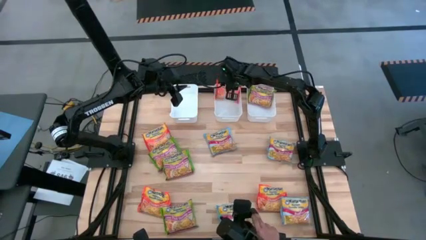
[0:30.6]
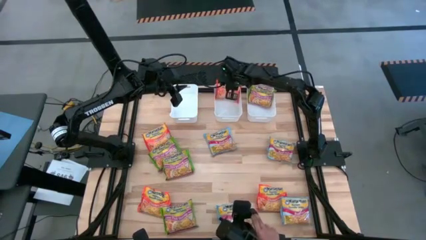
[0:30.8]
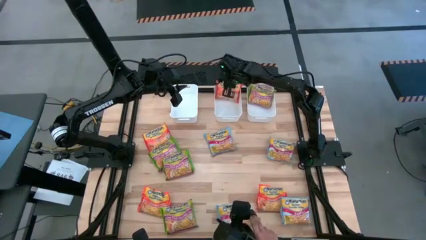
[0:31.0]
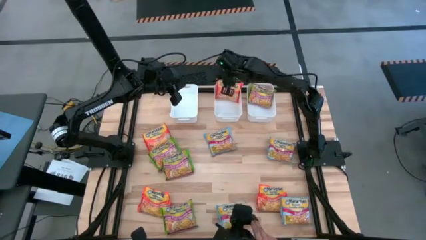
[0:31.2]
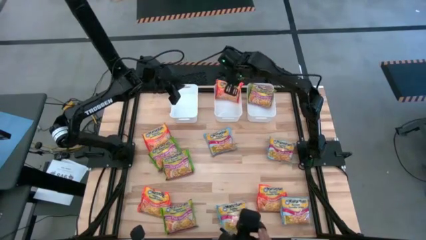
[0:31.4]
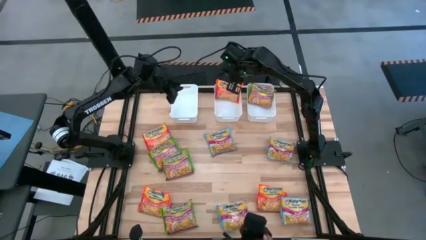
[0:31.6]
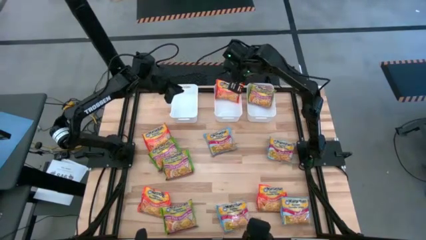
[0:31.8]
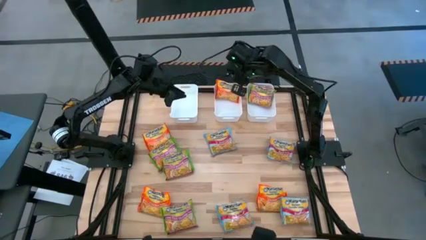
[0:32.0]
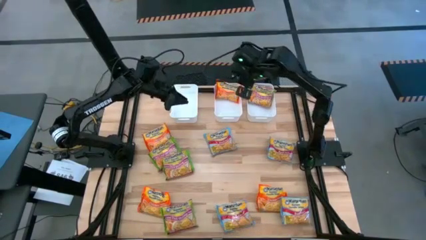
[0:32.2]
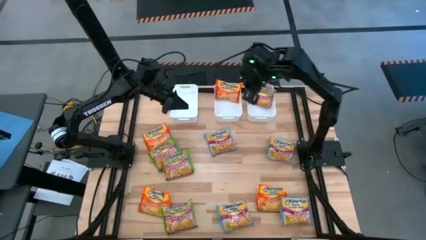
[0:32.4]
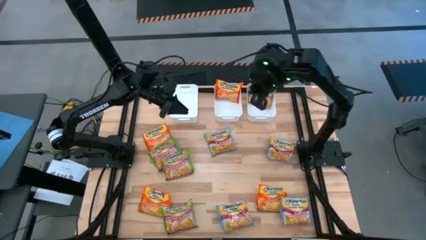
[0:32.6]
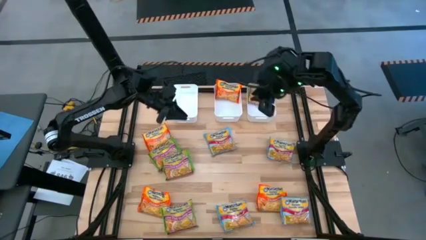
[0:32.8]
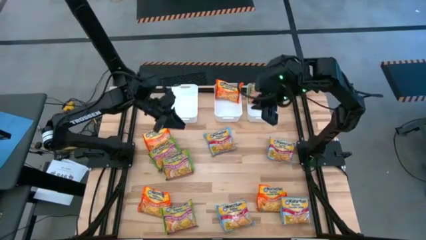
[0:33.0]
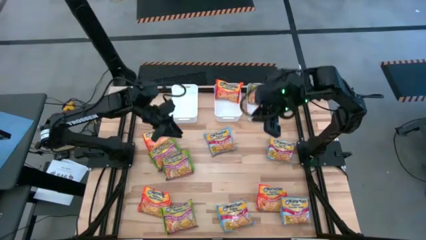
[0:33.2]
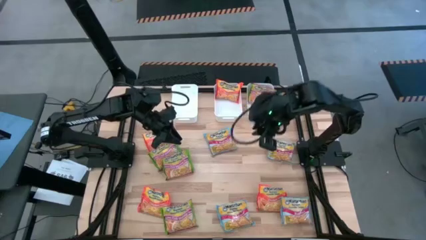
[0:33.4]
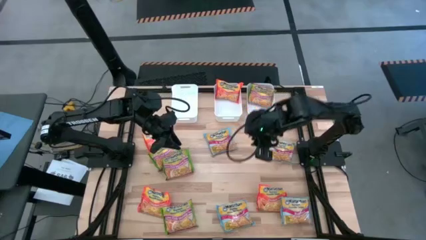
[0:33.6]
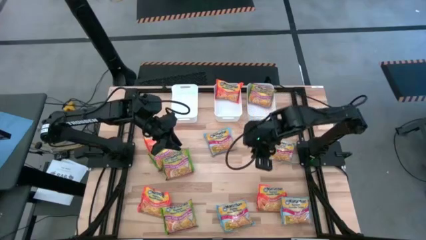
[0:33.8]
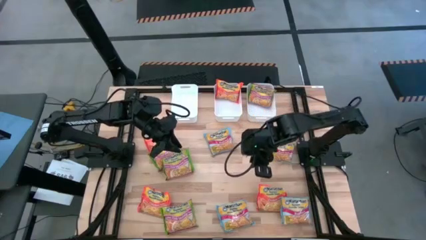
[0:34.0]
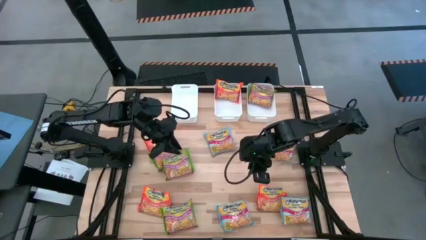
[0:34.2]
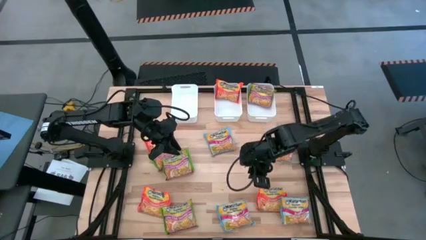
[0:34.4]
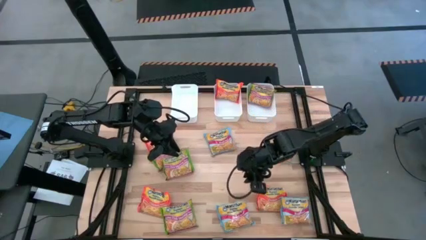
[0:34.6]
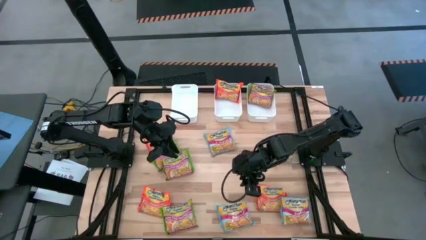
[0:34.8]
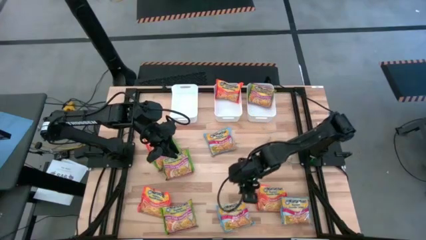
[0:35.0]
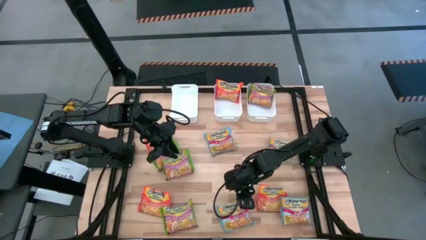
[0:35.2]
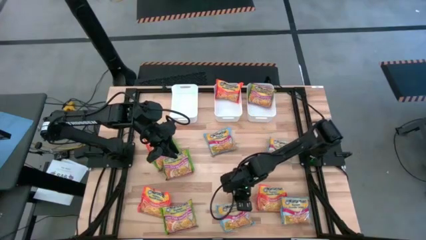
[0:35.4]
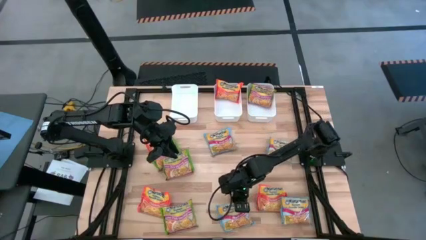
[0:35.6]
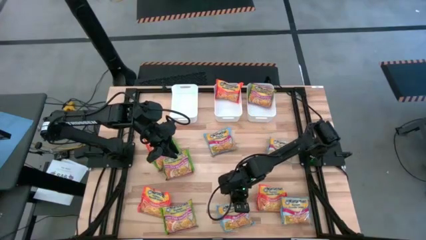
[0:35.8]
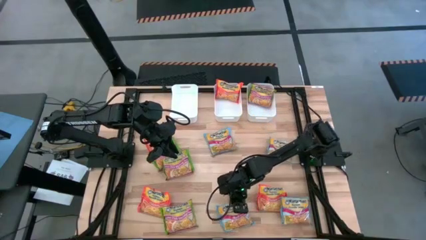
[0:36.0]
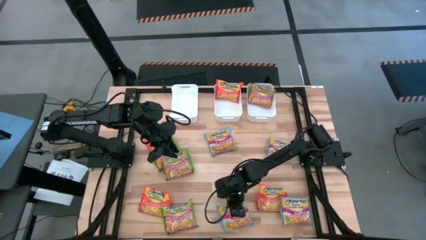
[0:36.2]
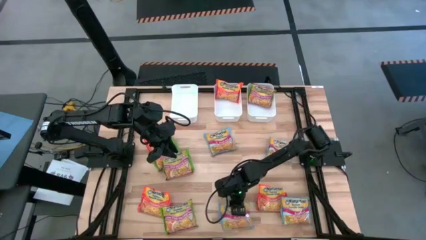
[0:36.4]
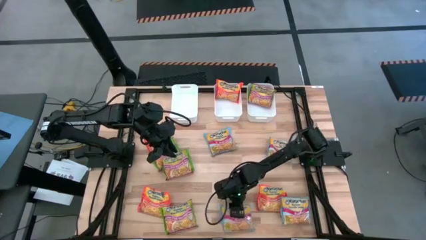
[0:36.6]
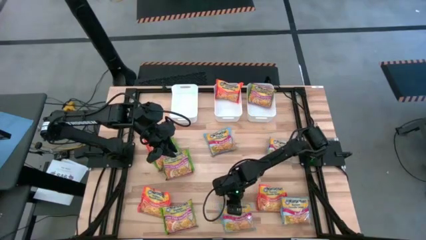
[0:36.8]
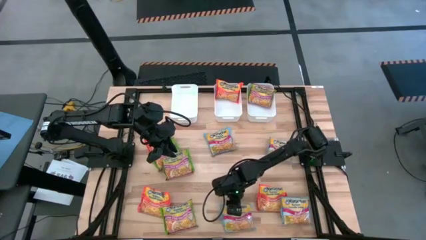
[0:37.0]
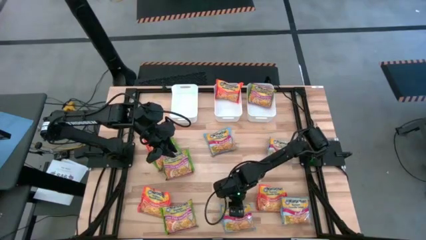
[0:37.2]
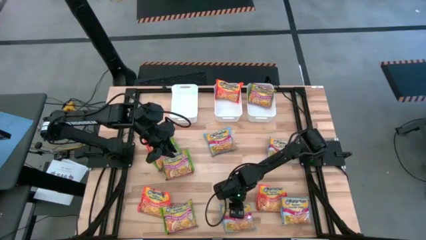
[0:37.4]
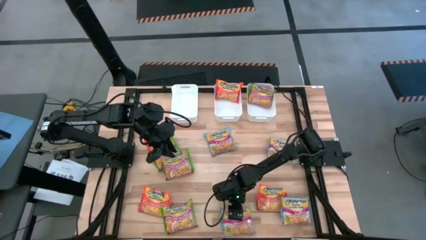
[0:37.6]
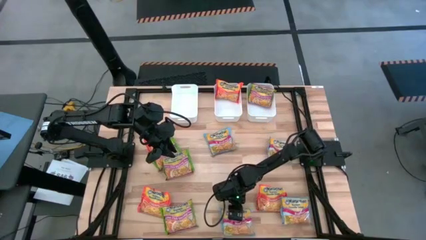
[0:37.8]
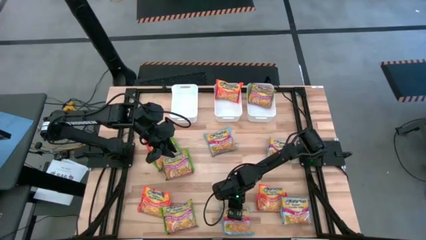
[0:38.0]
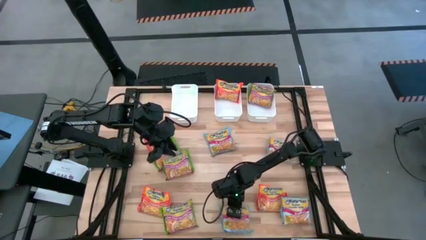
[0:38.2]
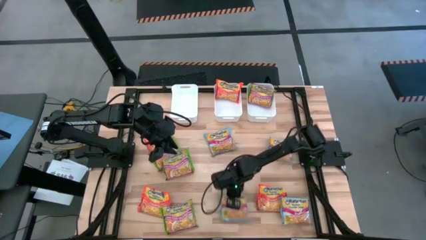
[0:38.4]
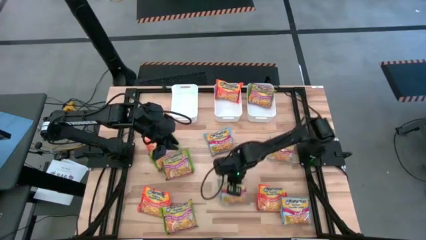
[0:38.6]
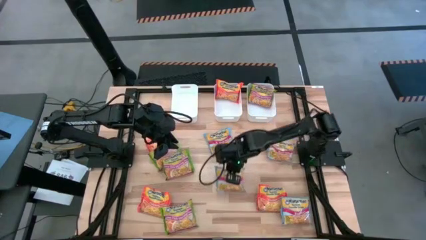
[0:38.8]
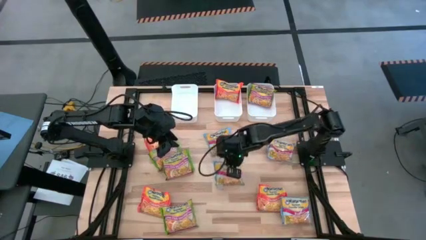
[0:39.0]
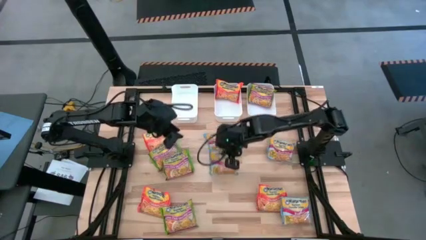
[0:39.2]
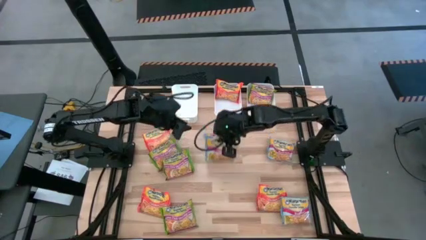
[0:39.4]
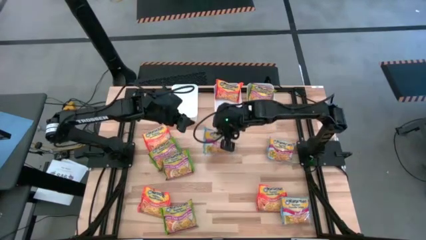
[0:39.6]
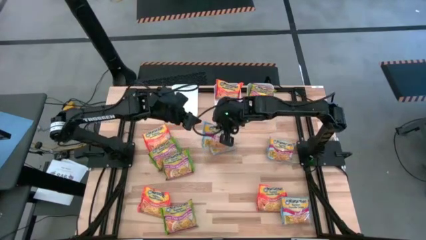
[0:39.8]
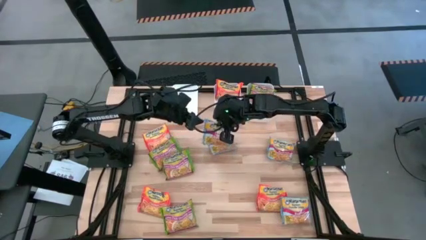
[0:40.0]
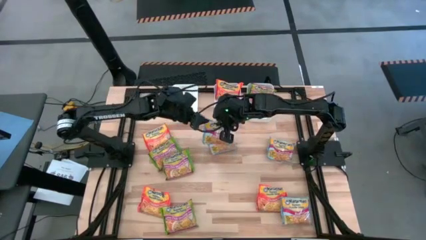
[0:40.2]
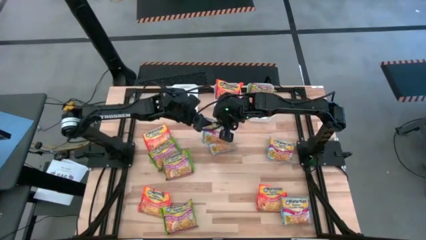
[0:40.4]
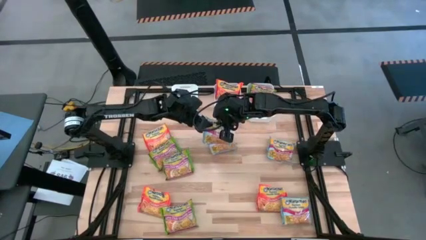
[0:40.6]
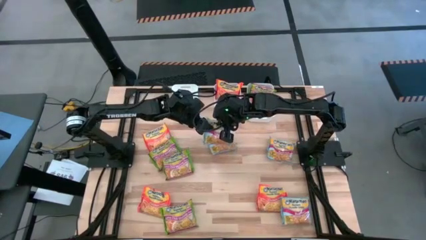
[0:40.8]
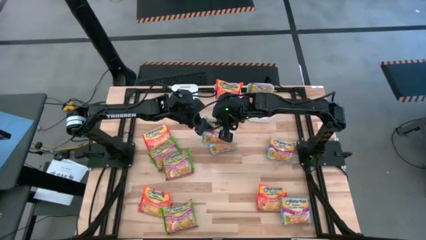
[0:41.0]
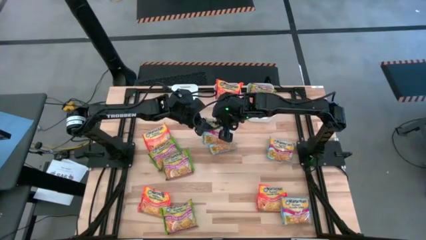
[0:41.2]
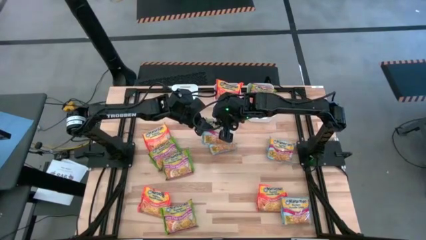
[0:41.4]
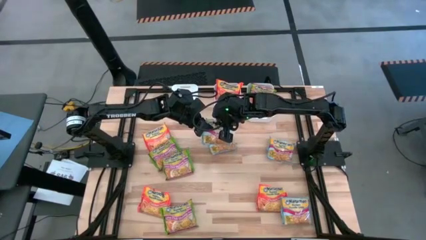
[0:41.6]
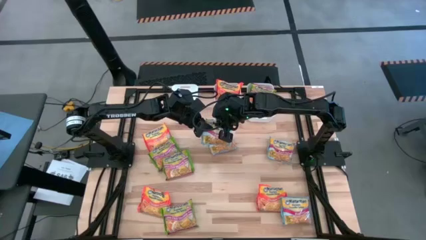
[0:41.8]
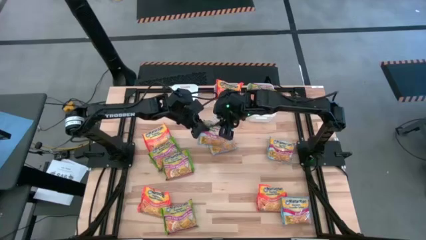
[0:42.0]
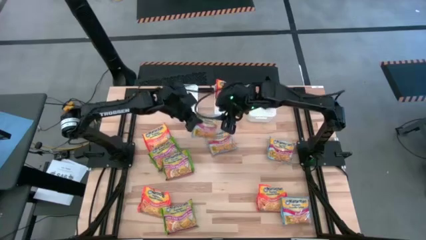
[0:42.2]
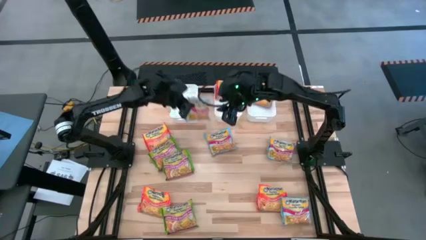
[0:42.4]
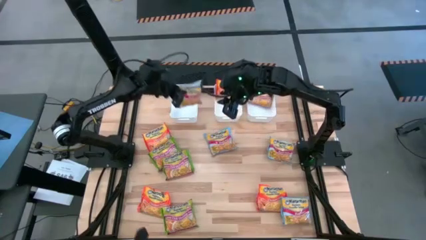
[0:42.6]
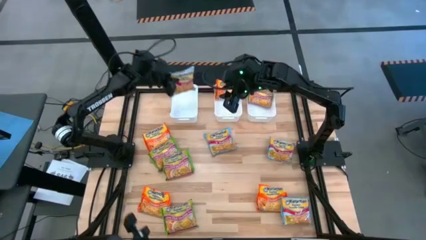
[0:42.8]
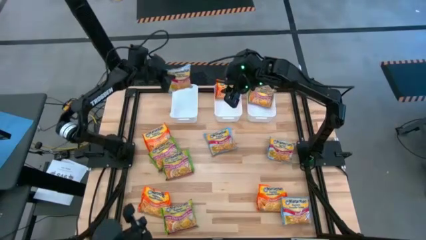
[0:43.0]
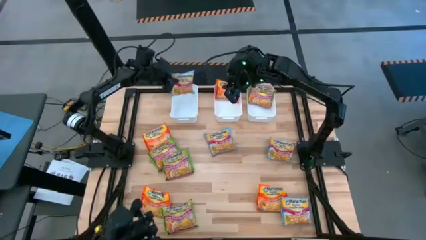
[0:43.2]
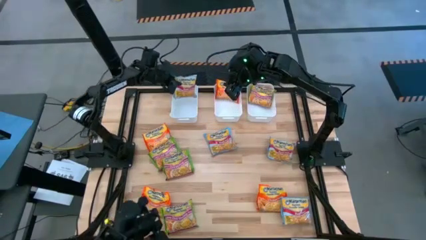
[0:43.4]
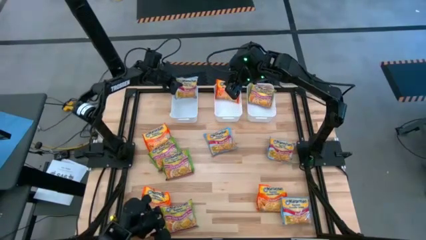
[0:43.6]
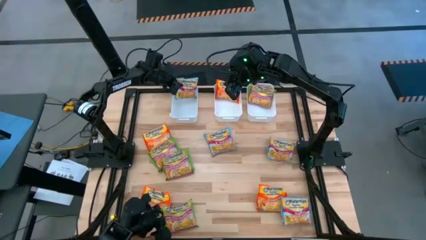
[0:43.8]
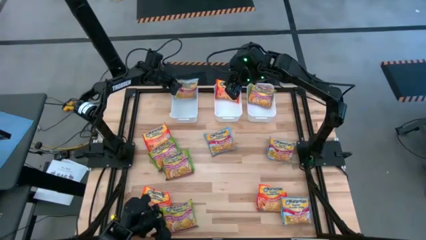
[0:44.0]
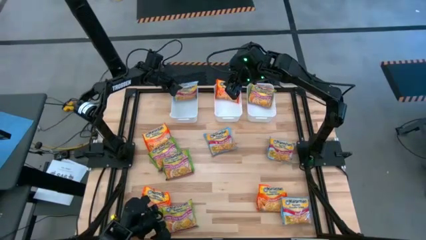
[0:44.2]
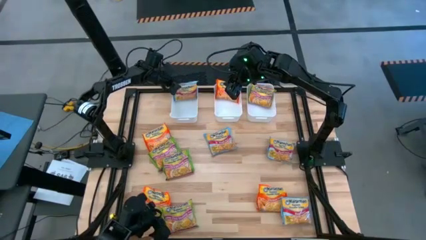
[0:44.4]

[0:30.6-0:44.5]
Task: Sort Maruchan noodles
Put the blue noodle pack into the left white bin
